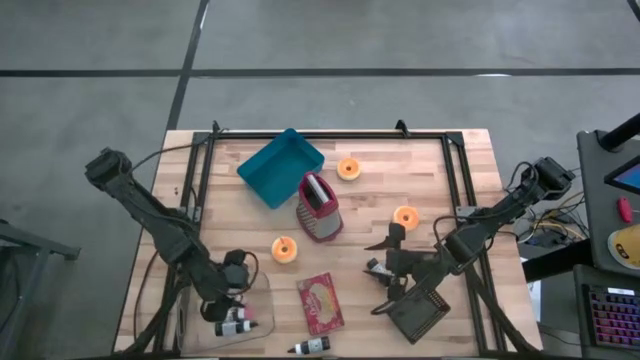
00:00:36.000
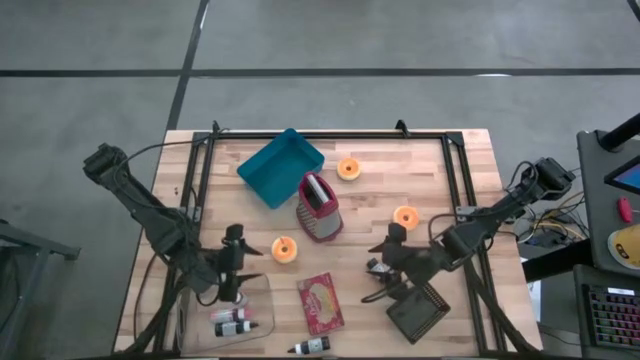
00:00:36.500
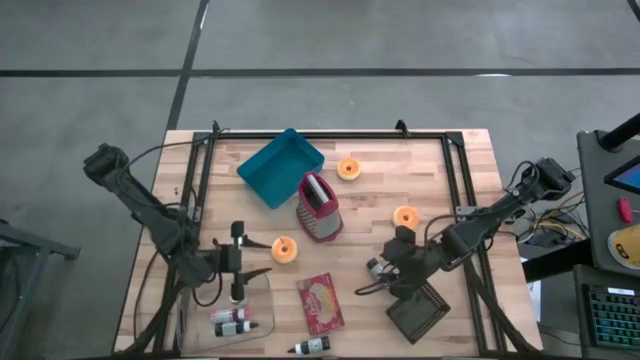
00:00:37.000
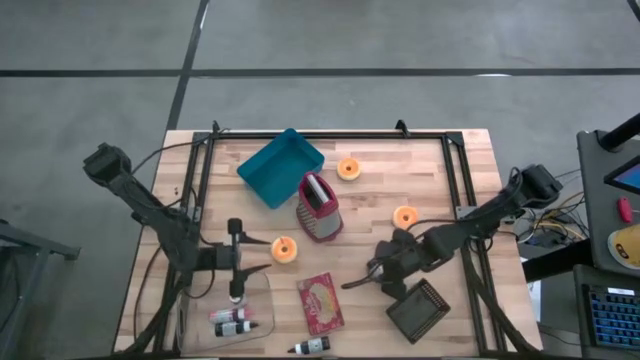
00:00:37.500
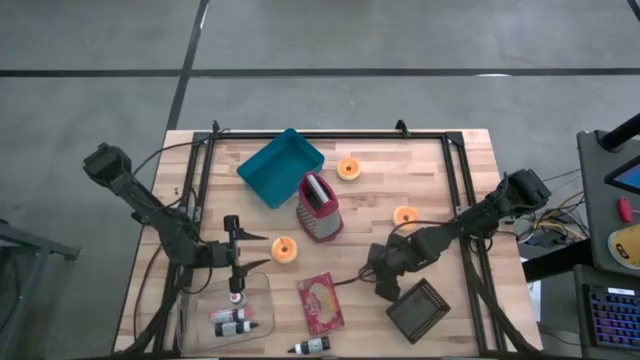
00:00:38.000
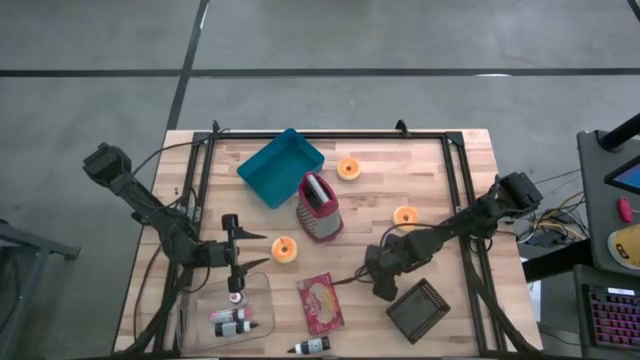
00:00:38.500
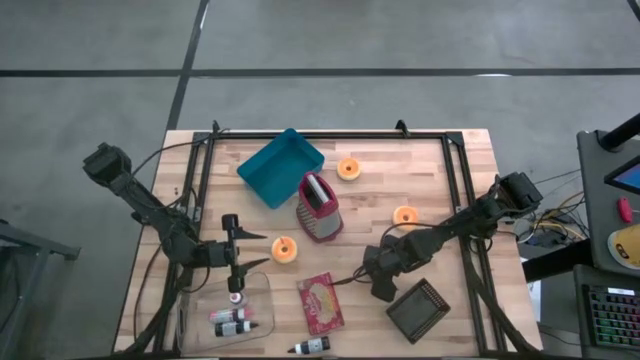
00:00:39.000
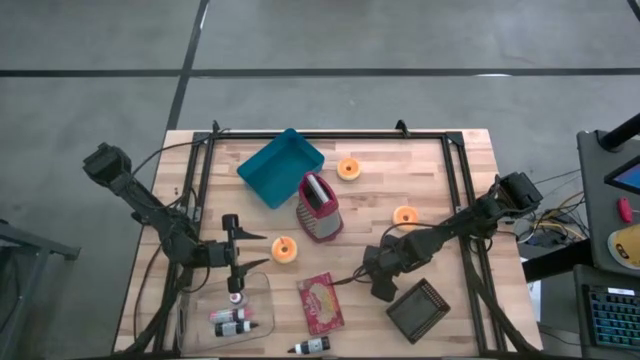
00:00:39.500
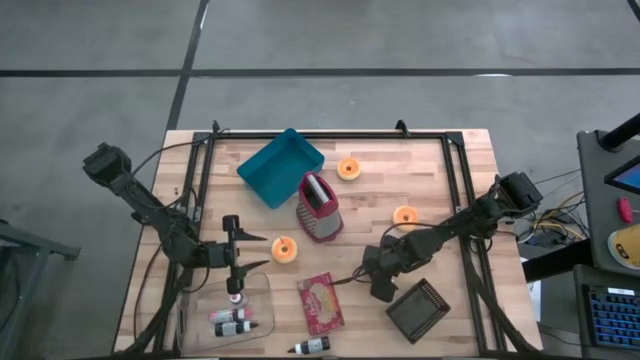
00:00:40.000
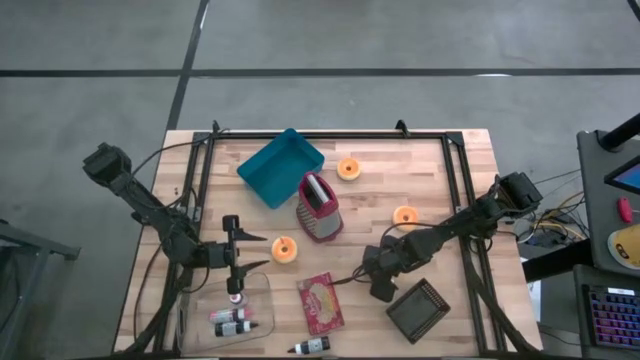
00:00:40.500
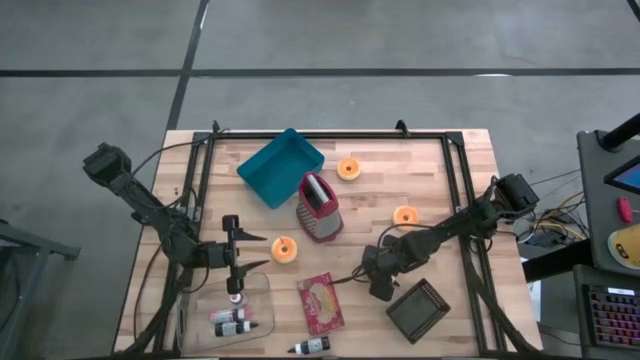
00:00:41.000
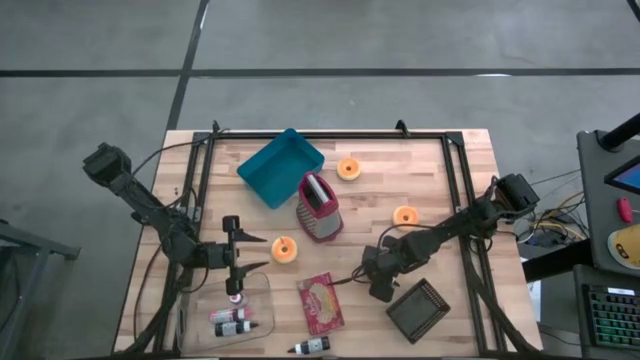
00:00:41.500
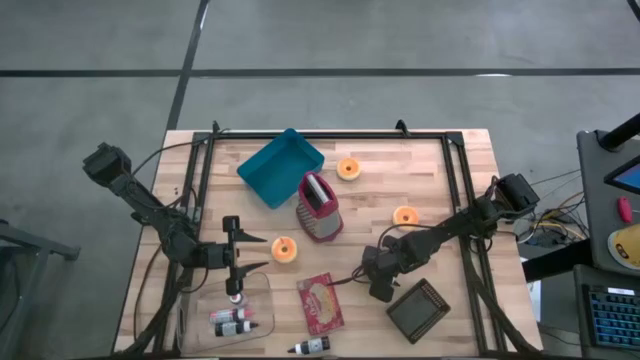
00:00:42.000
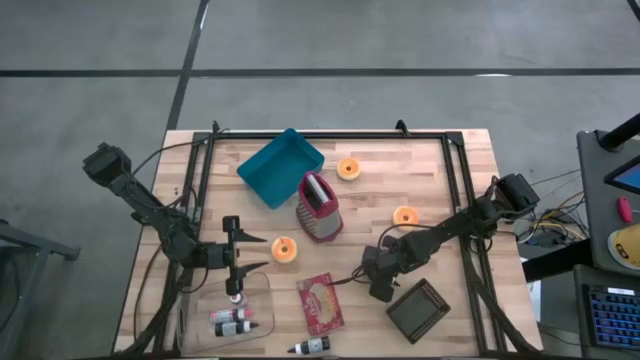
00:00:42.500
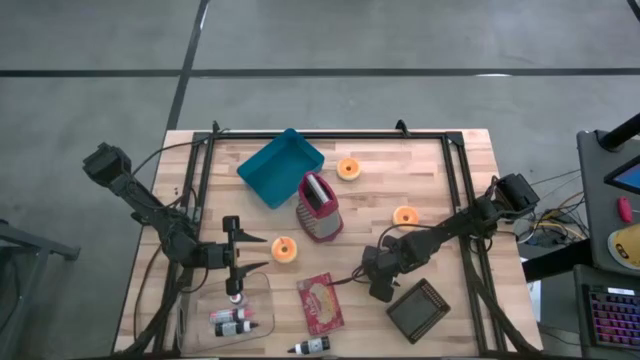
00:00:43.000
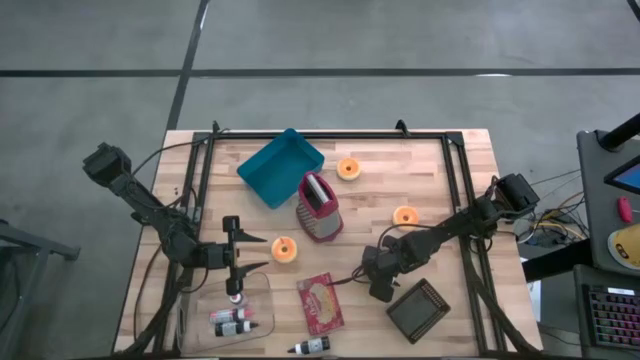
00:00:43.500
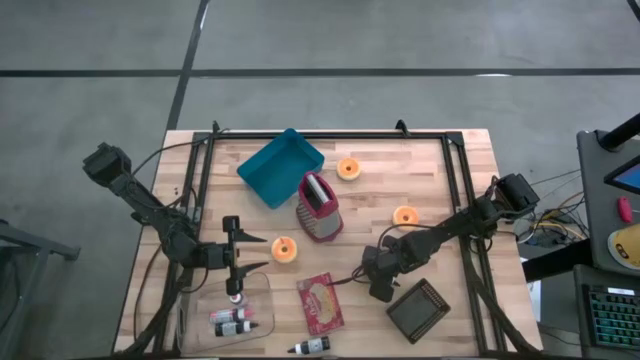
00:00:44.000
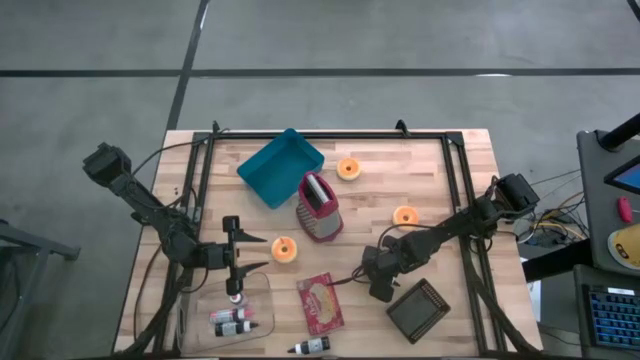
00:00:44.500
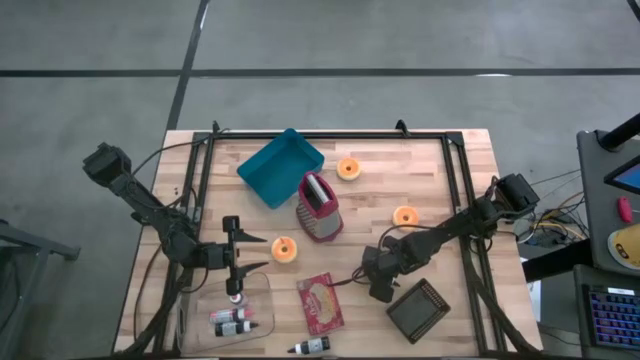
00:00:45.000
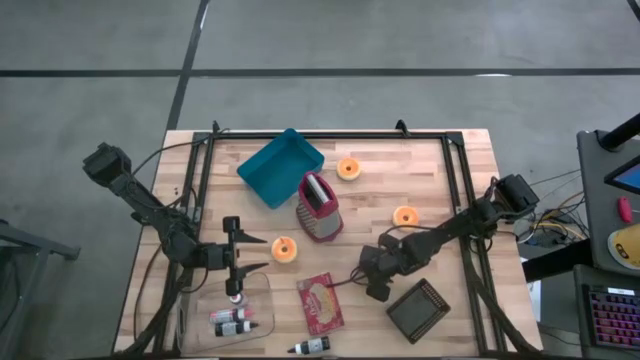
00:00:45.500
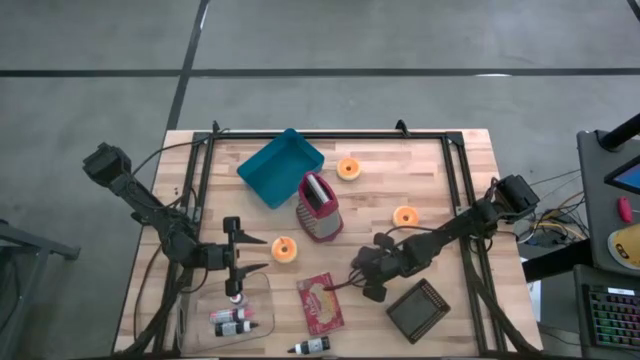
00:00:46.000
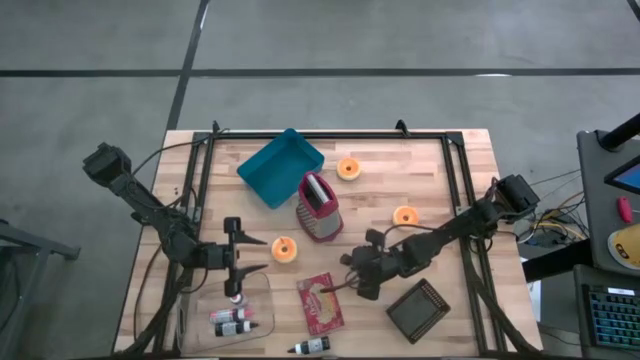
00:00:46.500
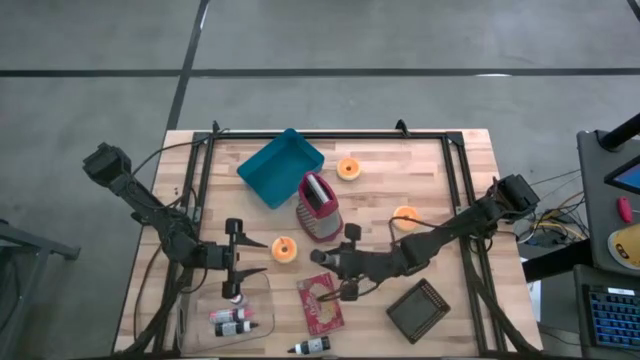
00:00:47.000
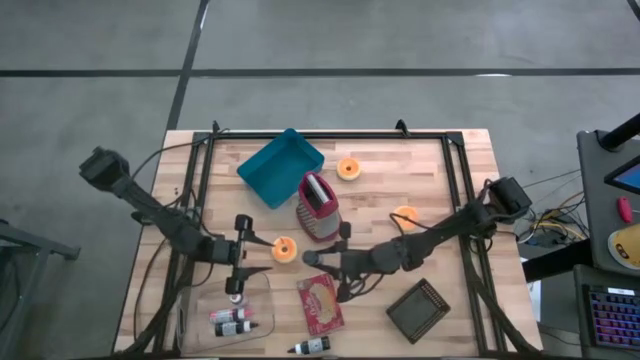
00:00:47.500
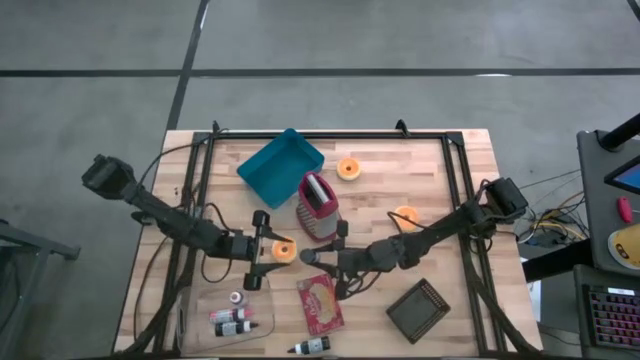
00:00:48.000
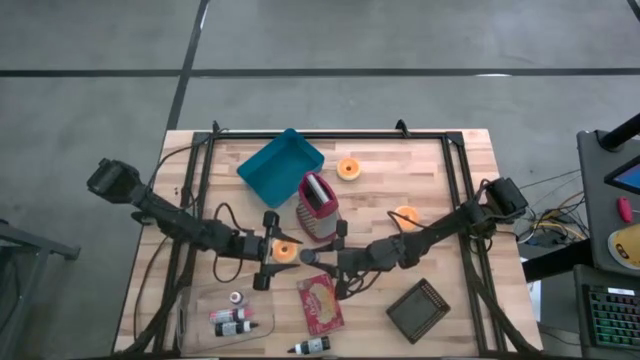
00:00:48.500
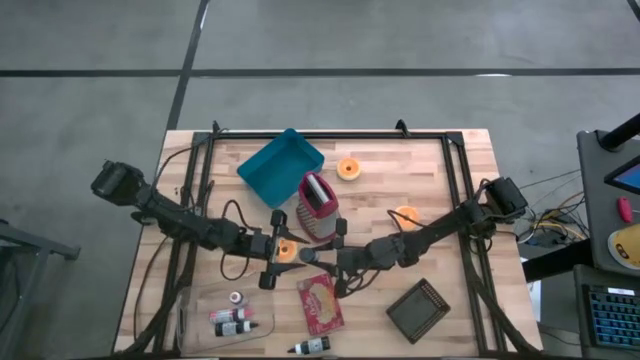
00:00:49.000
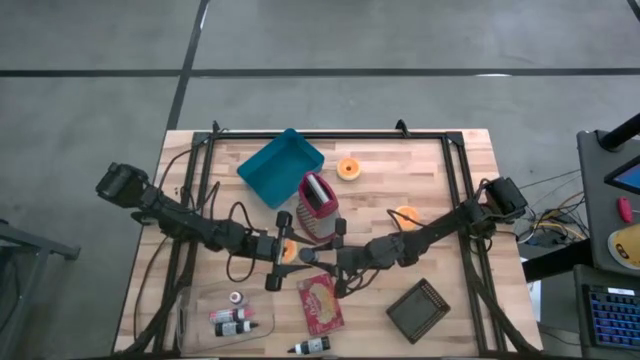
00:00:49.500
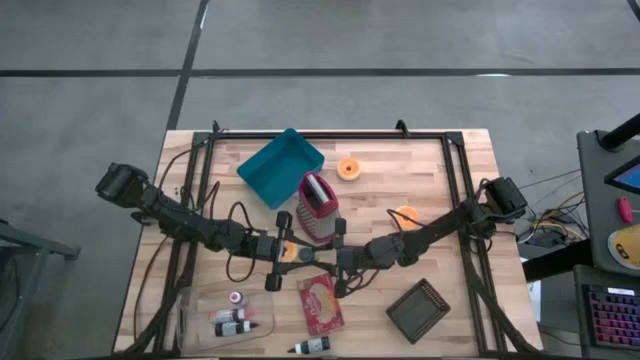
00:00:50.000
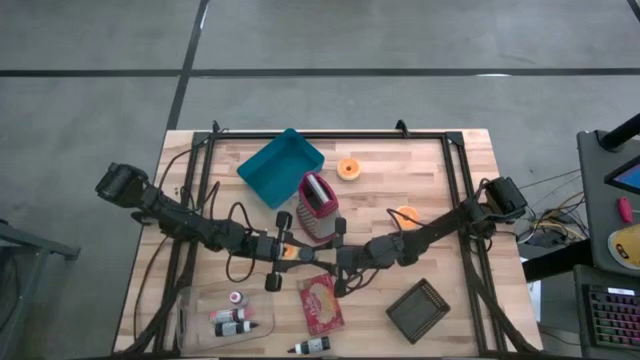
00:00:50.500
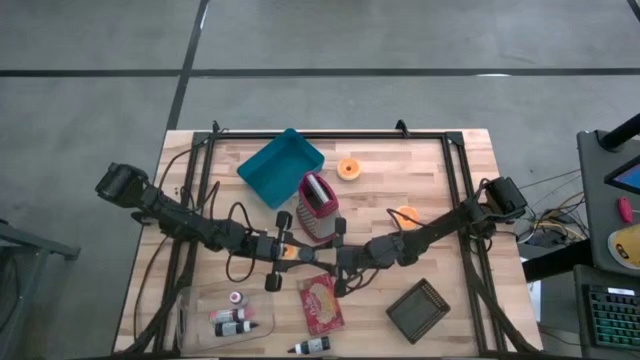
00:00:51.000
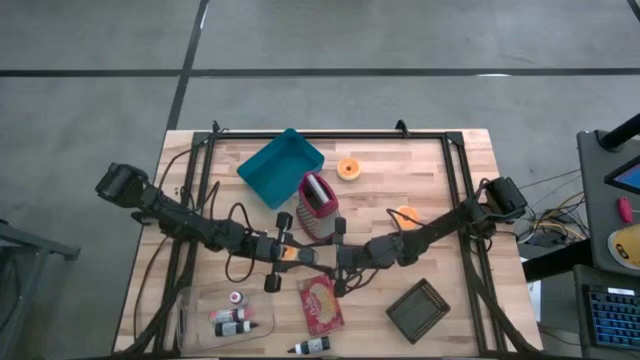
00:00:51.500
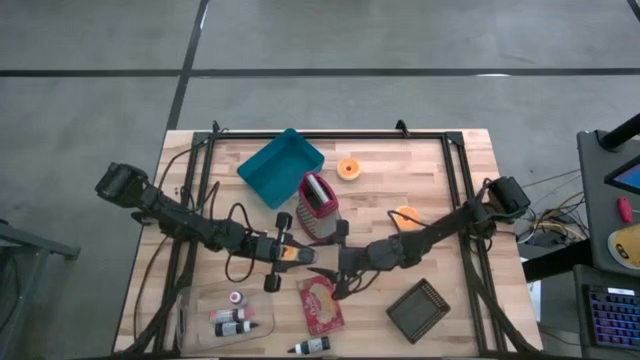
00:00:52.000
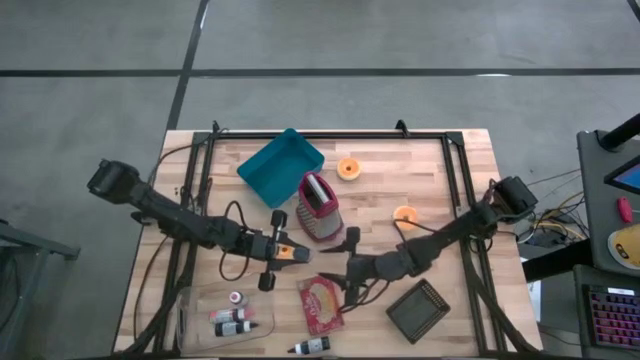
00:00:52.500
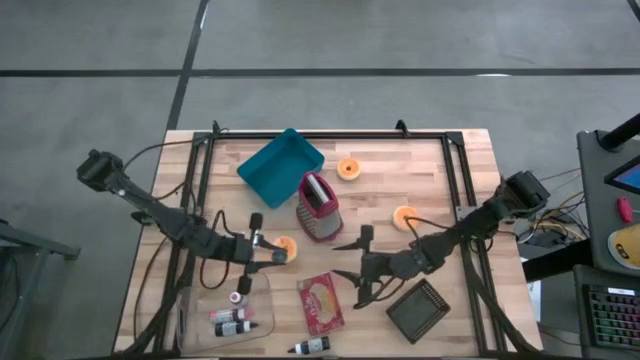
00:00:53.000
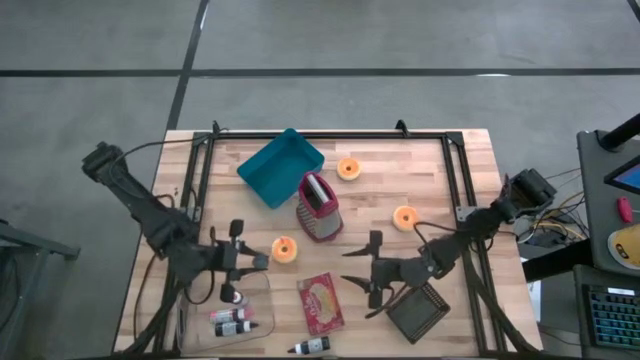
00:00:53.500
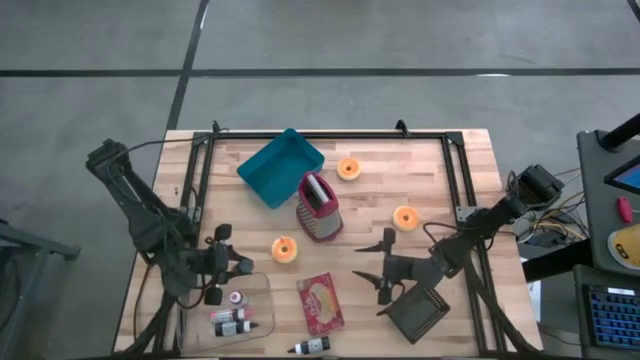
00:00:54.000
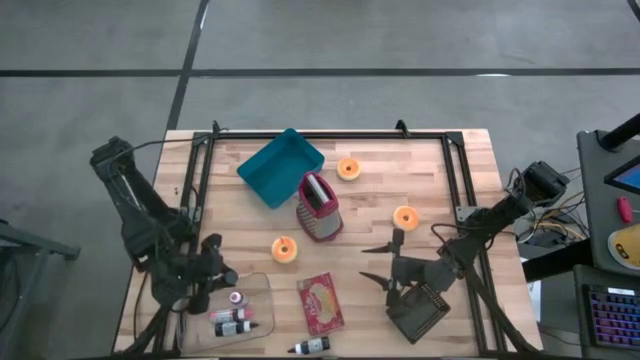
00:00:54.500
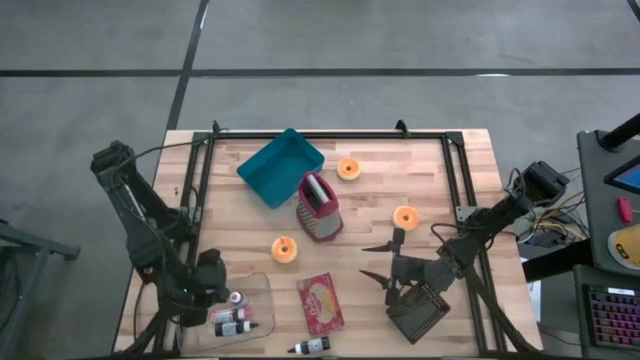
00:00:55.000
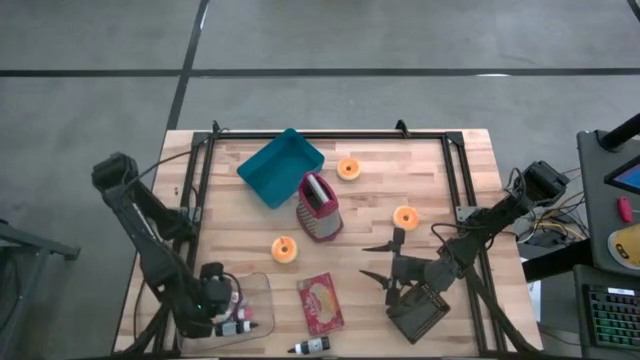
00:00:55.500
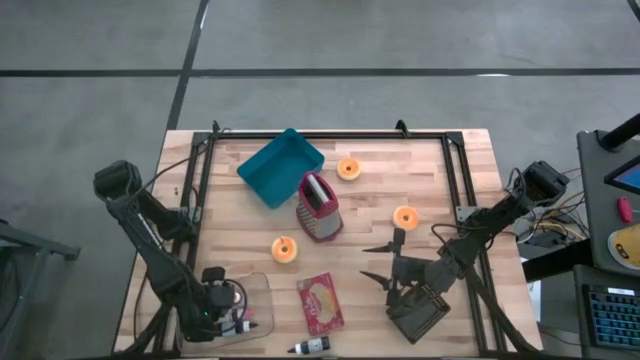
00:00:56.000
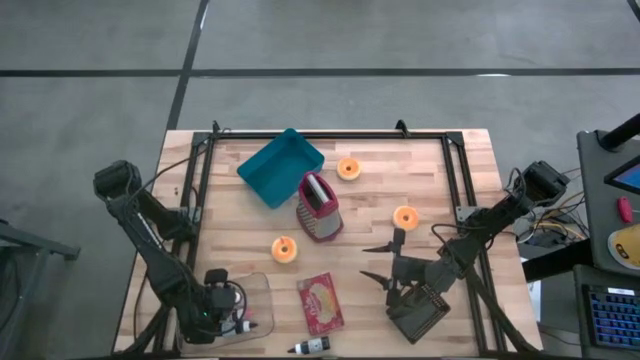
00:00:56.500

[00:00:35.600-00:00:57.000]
Put the top black food coloring into the transparent bin
